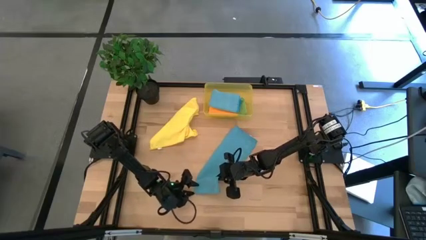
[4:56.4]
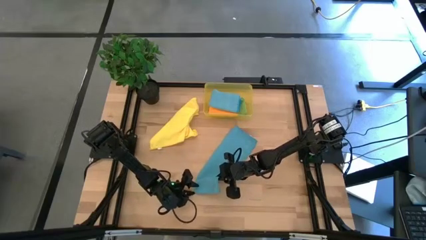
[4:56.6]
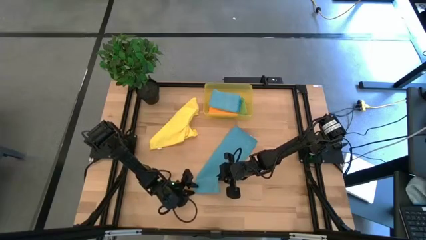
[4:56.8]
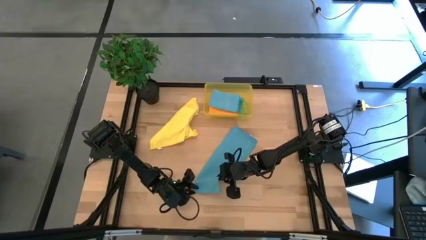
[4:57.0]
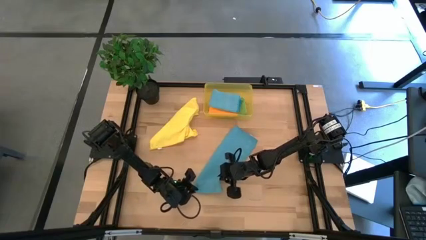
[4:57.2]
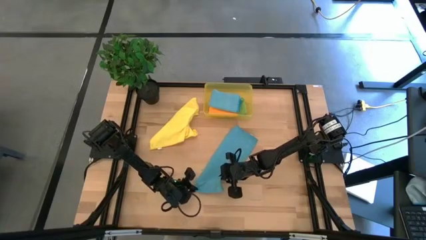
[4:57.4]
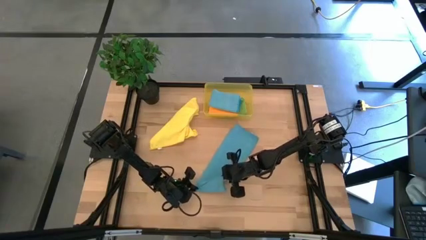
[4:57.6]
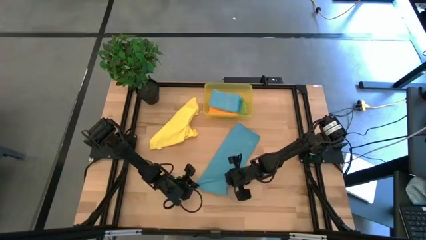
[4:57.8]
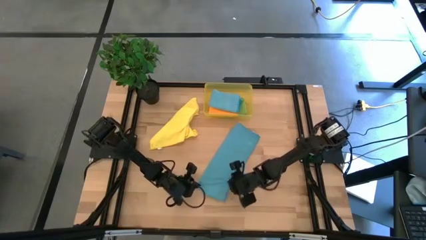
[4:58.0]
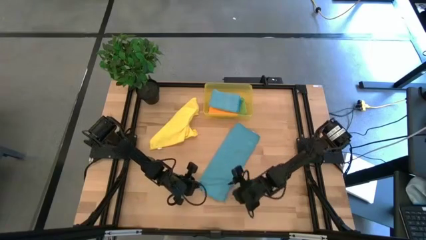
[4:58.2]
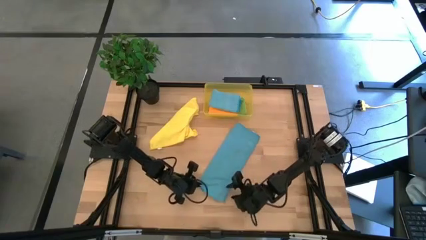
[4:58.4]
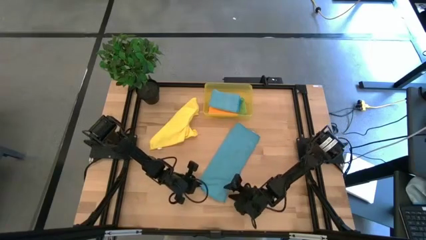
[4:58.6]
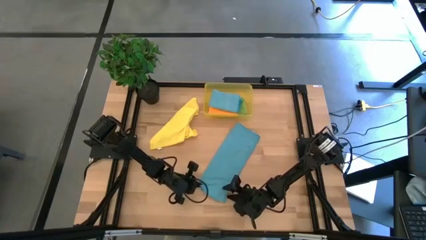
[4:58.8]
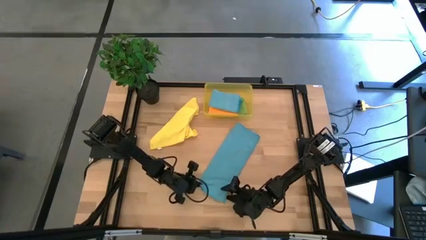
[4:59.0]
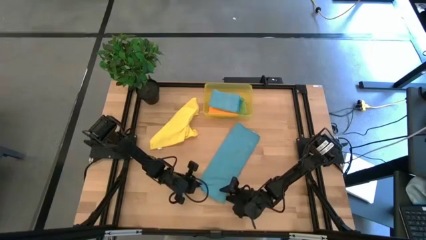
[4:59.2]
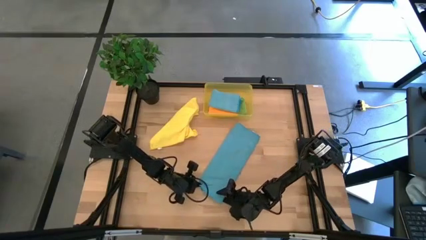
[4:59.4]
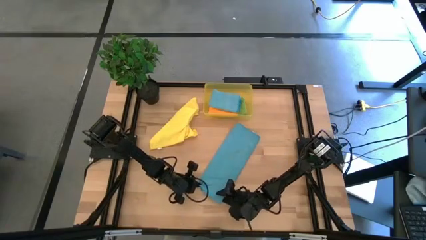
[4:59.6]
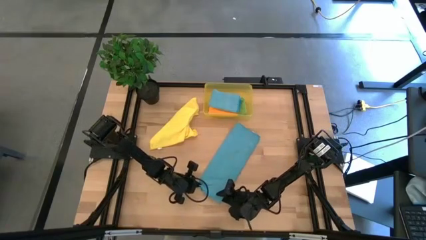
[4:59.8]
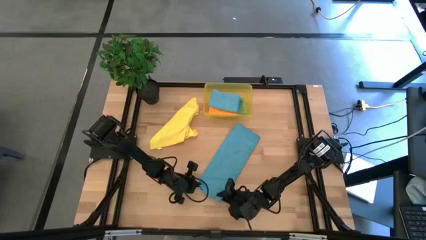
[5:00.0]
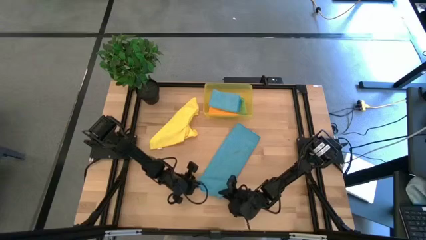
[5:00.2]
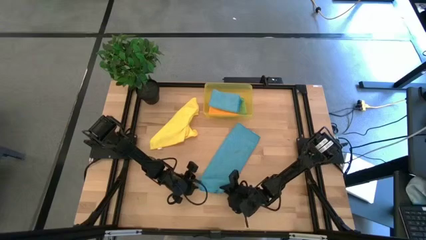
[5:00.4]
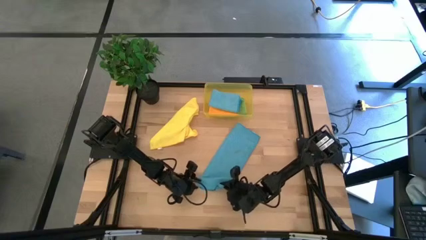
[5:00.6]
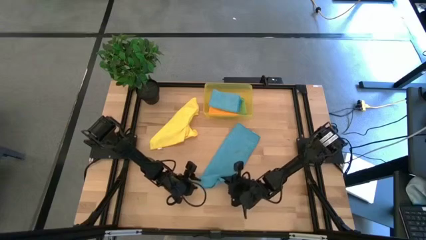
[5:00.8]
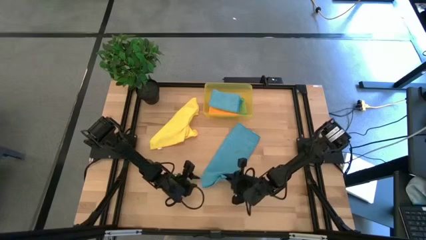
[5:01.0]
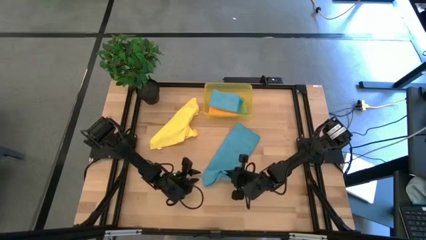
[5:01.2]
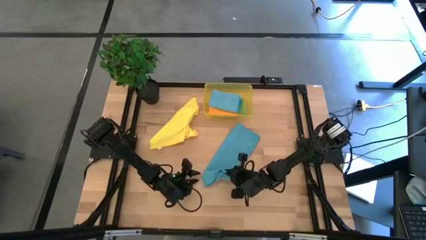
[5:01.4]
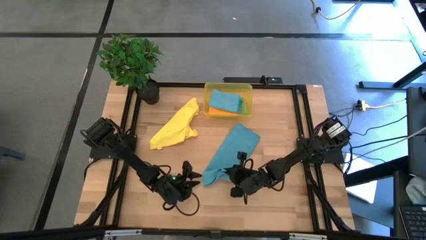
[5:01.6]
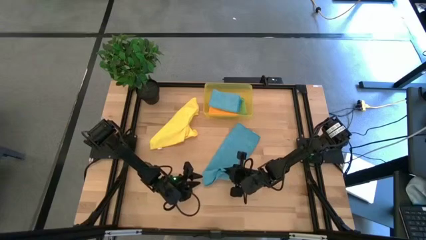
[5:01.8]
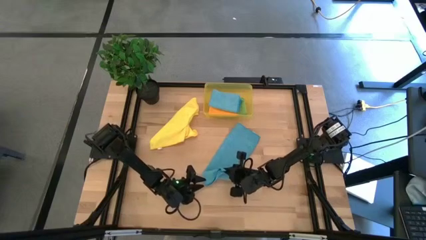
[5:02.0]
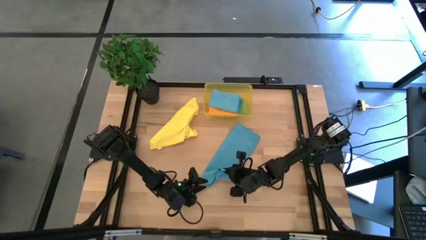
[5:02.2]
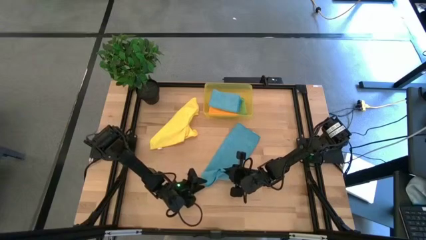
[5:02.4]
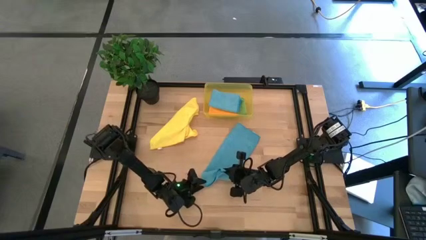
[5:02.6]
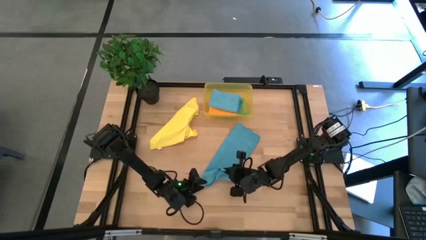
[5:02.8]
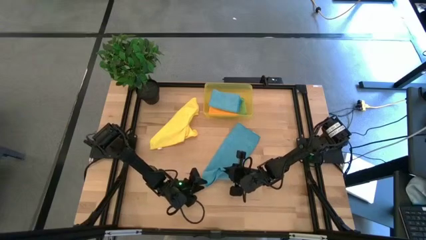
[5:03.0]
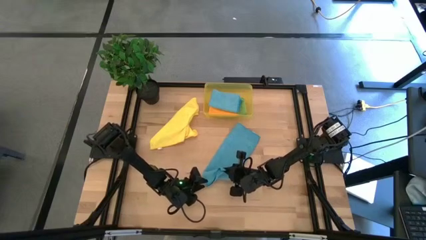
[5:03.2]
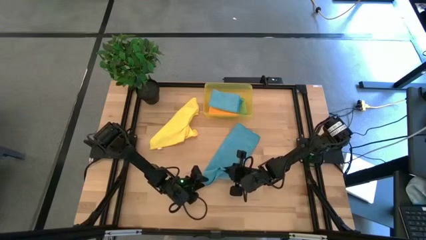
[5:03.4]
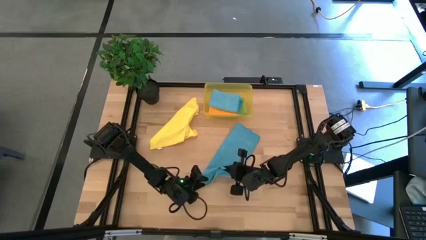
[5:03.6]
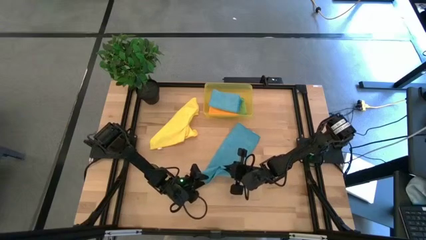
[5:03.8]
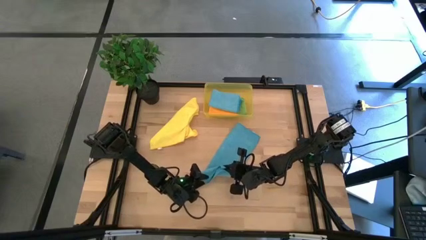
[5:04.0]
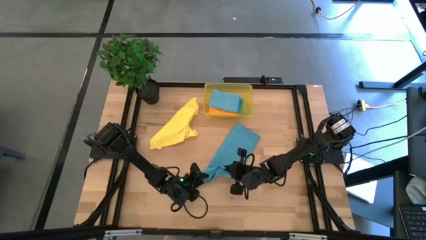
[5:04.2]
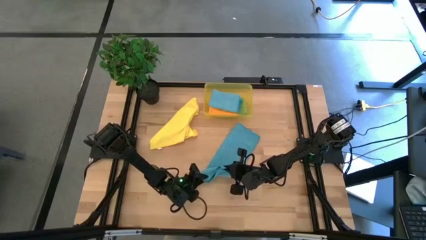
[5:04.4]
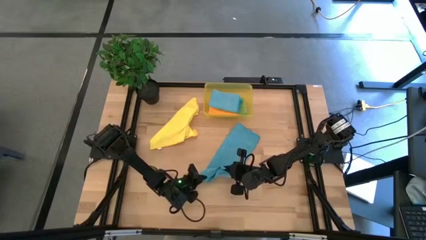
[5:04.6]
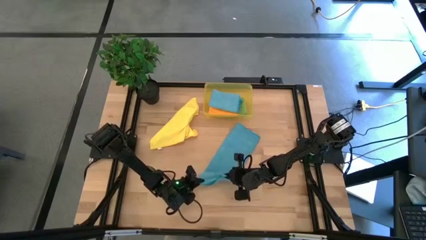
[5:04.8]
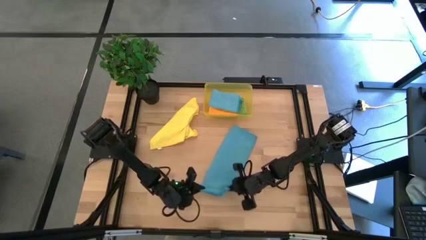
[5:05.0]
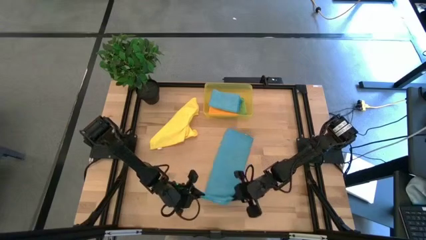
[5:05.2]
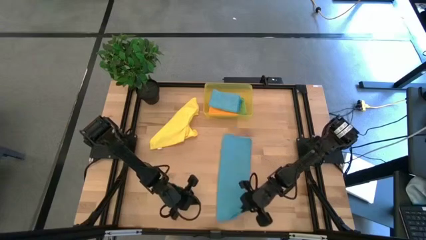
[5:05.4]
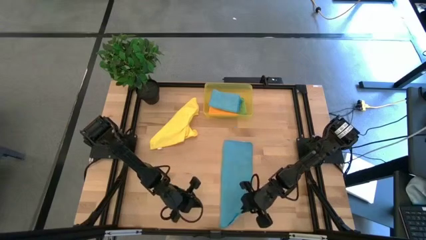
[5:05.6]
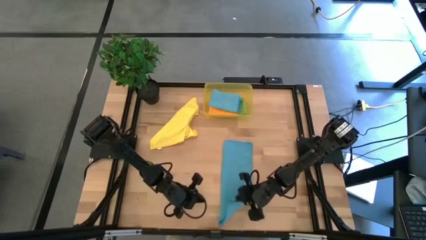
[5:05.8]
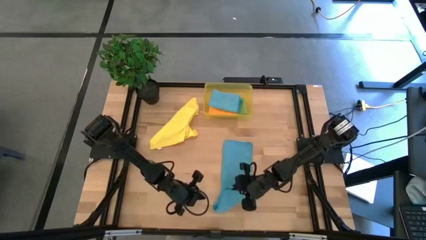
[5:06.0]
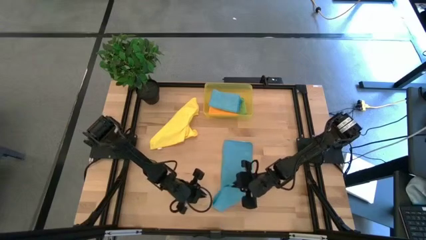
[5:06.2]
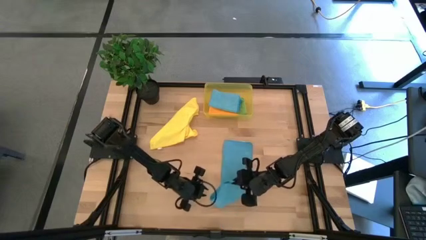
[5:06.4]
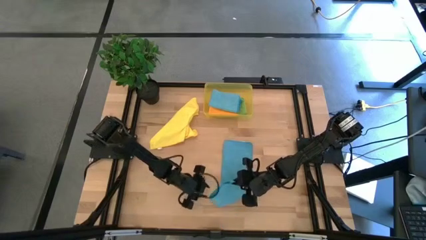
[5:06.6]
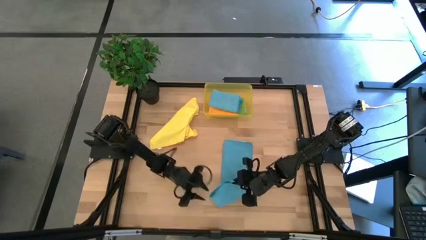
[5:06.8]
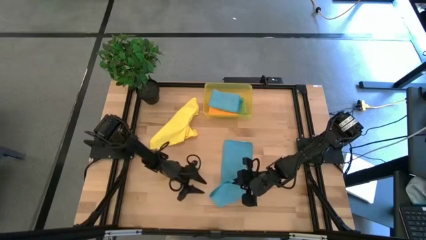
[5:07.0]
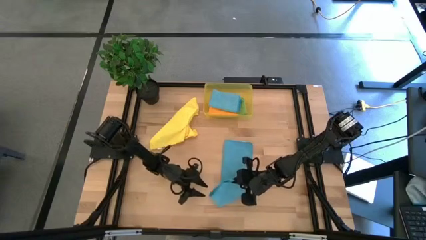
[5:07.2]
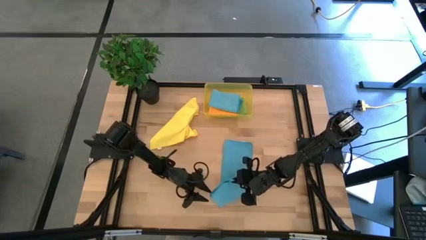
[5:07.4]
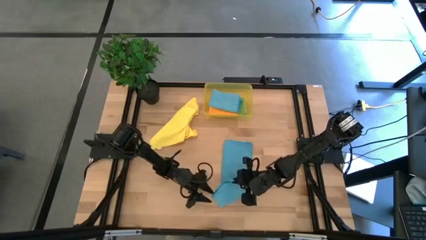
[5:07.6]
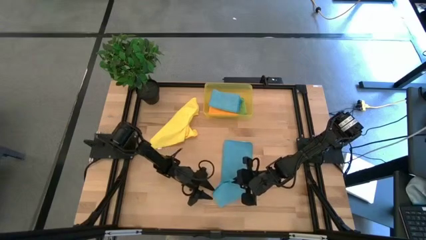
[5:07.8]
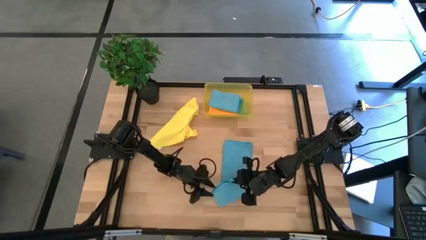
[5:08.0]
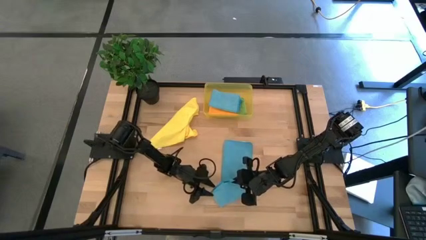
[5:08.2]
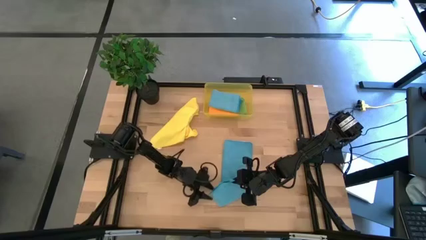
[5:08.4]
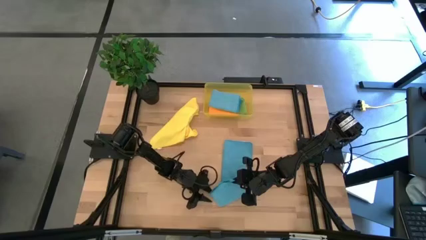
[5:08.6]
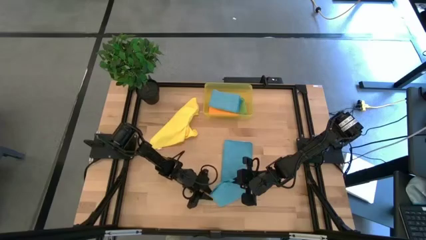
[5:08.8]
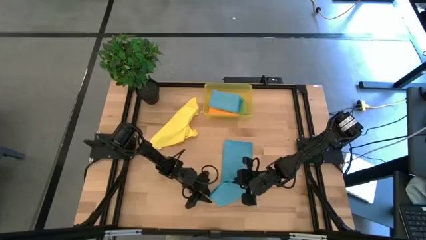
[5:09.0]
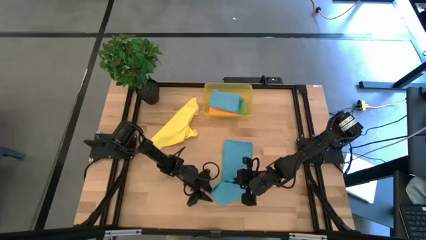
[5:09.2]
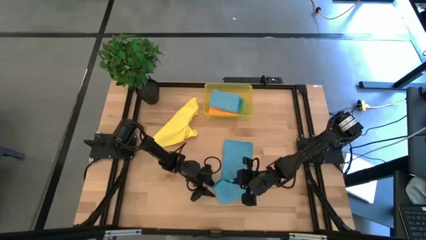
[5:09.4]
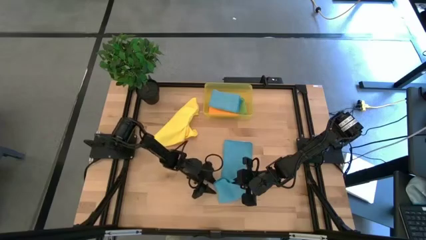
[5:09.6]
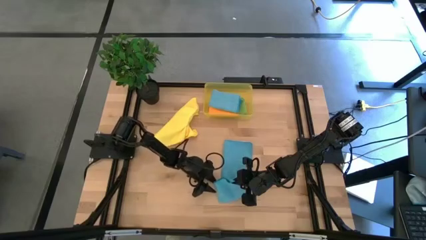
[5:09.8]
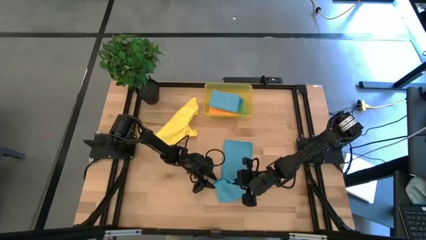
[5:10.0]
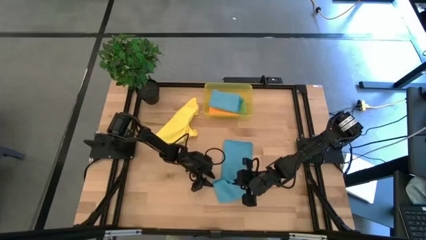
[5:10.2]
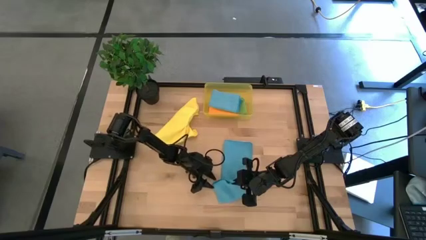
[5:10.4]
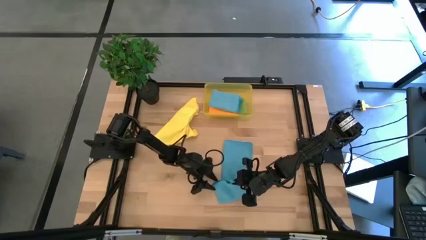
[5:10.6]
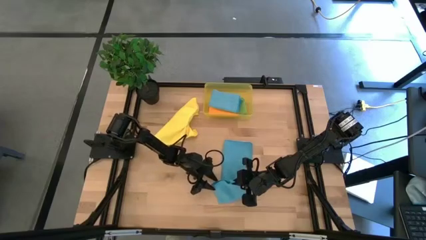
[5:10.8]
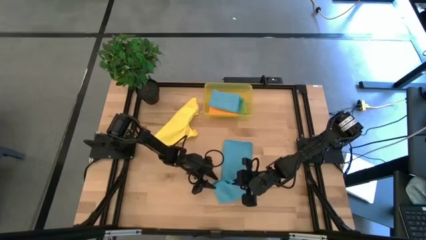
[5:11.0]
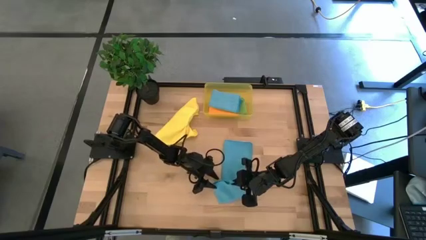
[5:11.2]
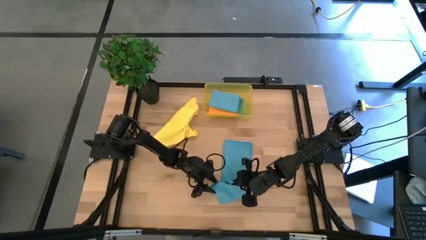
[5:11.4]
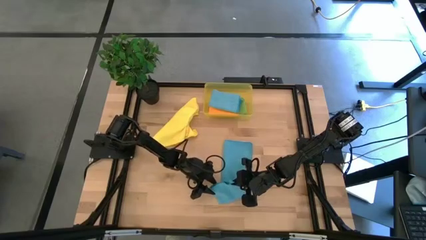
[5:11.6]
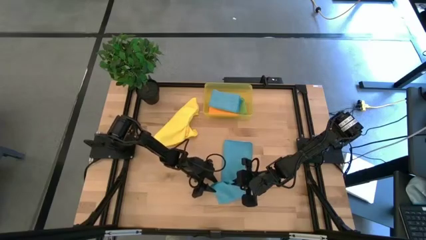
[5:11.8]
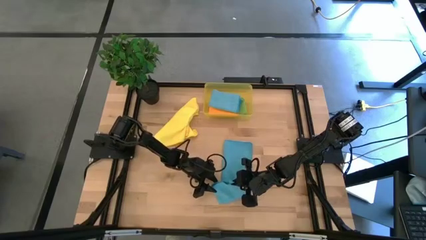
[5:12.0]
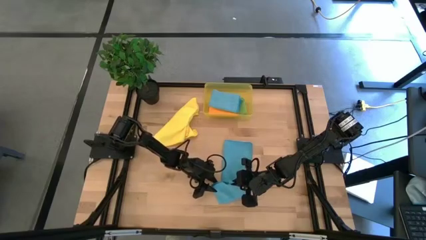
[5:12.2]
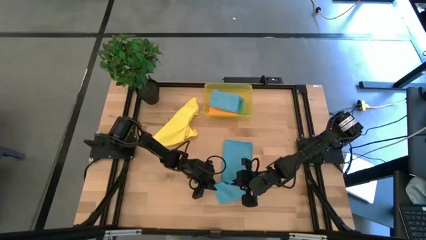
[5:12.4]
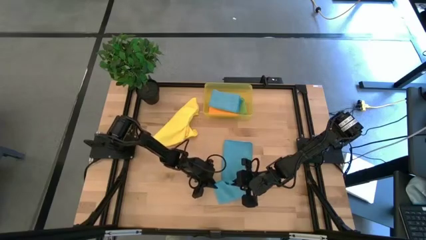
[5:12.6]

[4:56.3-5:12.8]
Task: Fold microfiber towels
Fold the blue microfiber cloth
